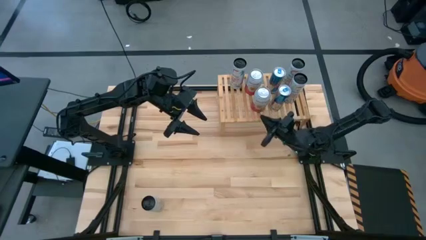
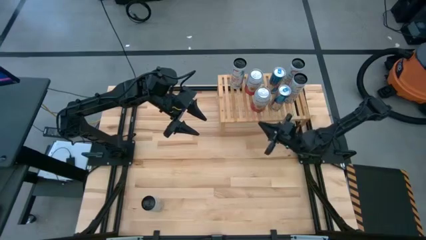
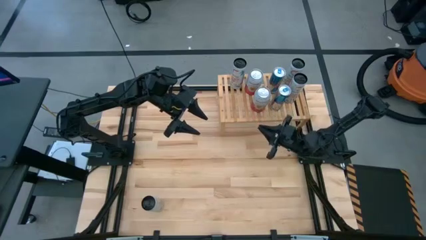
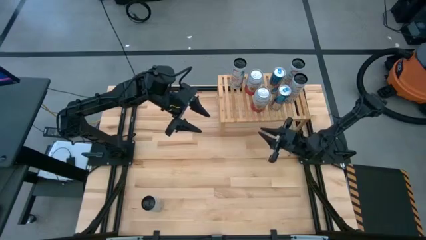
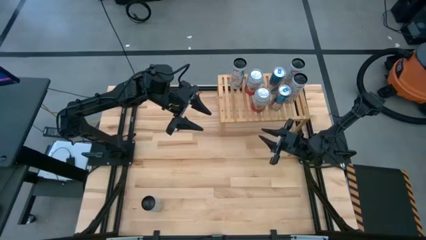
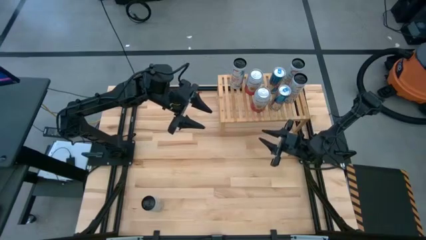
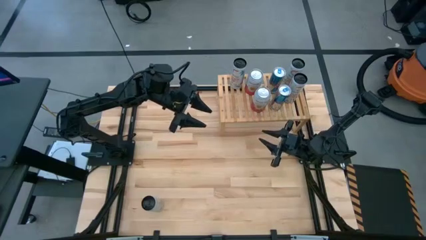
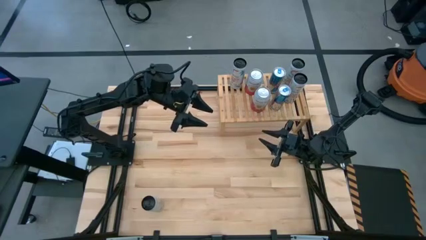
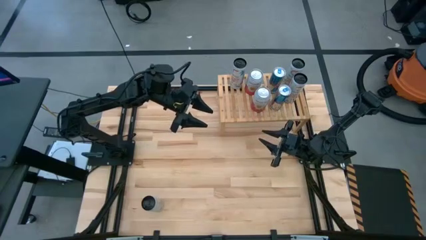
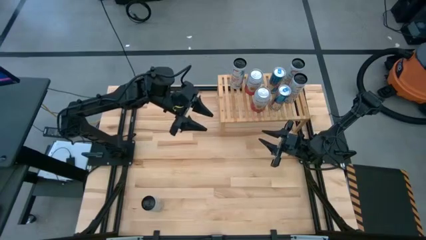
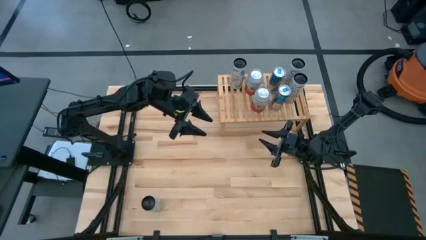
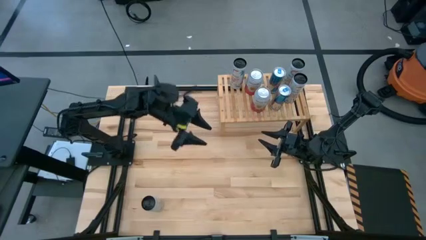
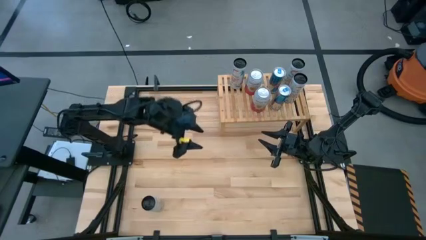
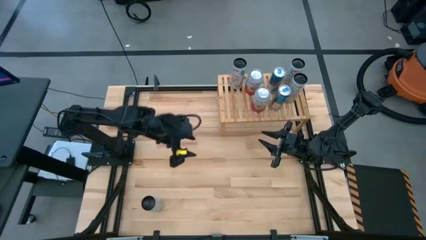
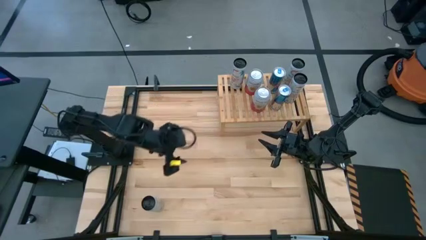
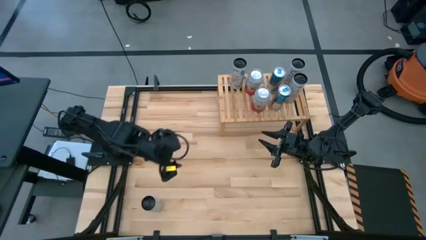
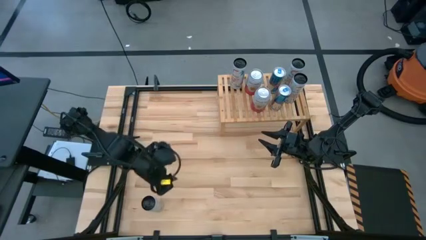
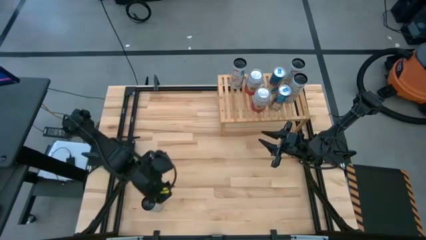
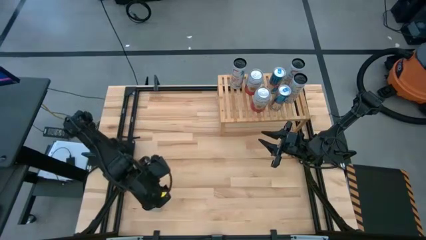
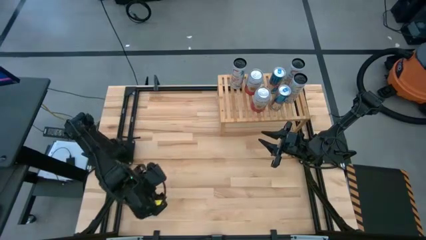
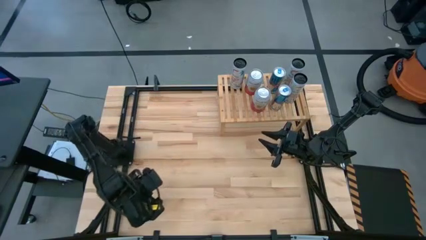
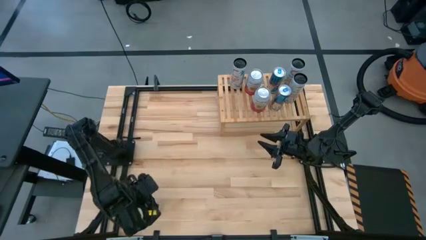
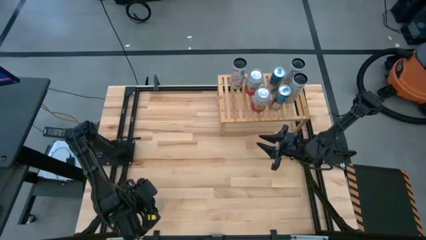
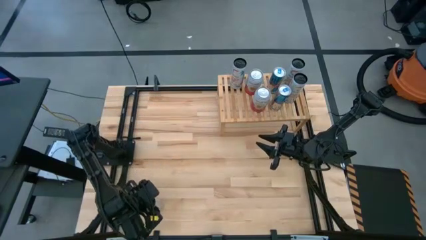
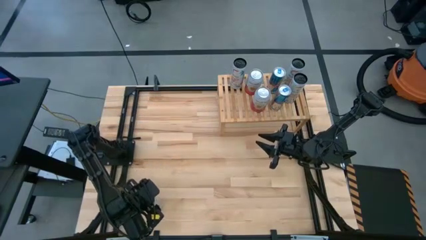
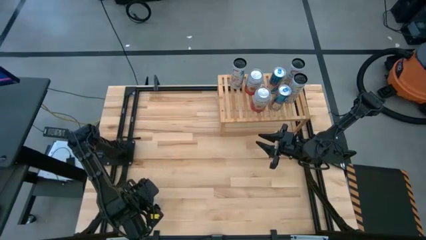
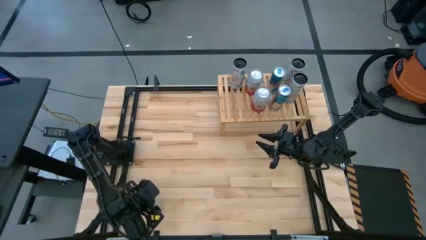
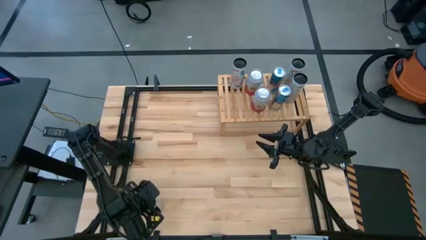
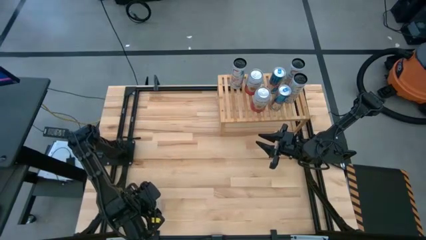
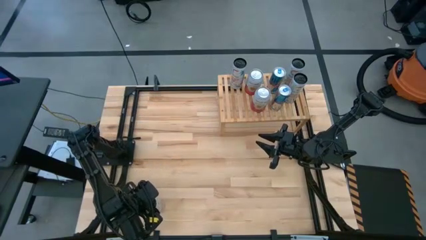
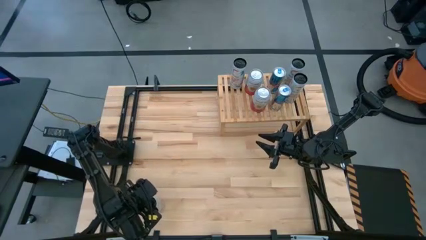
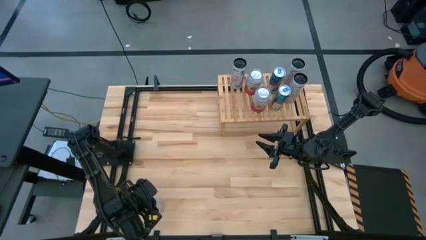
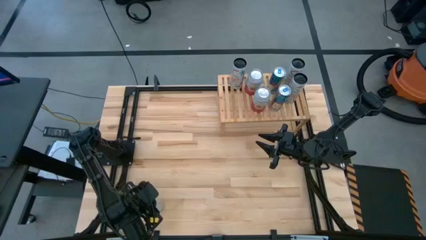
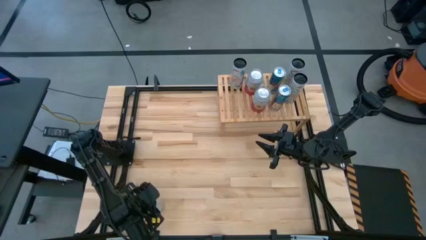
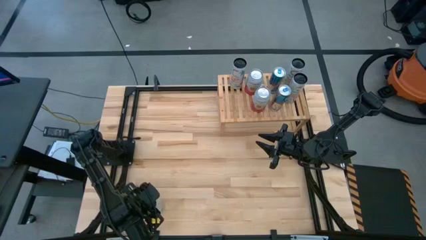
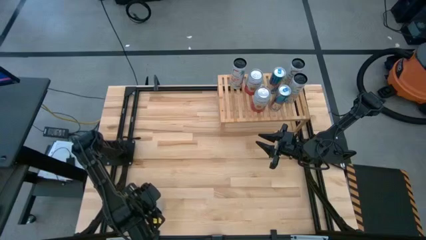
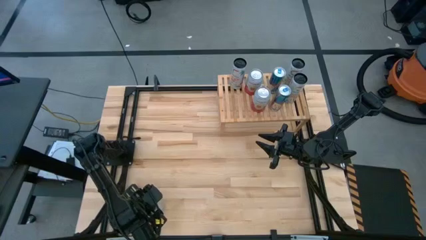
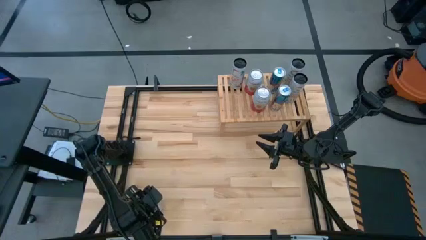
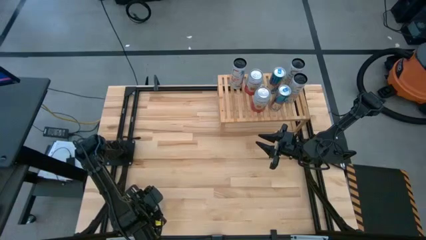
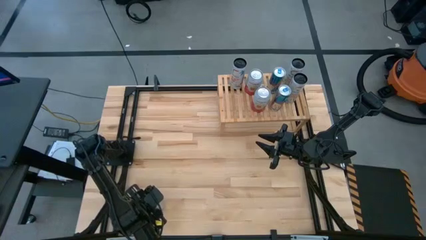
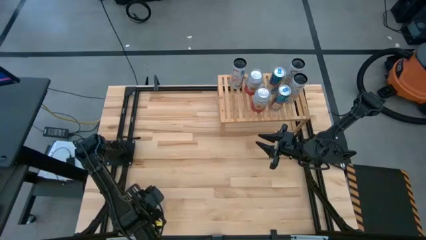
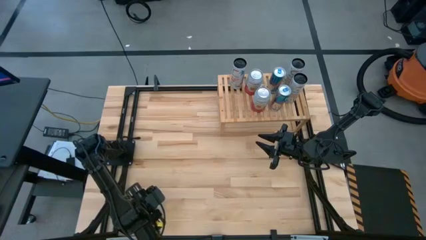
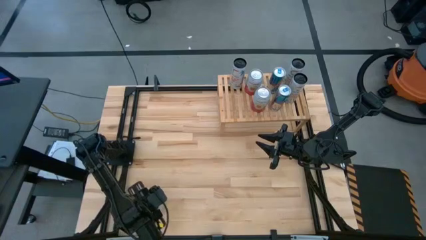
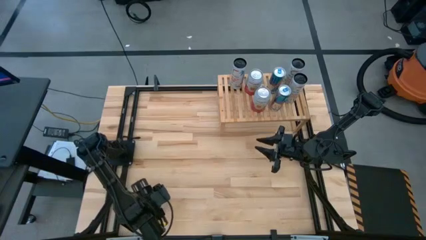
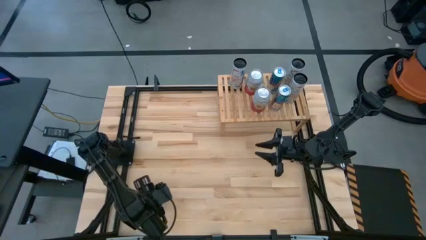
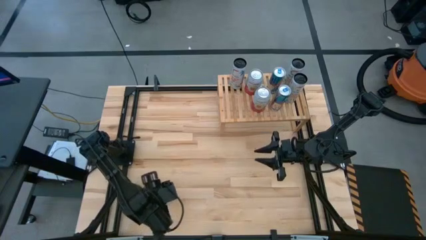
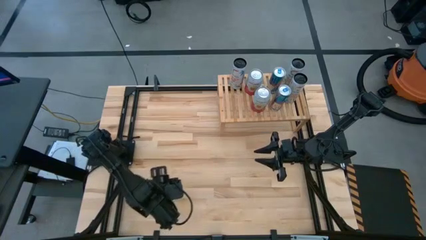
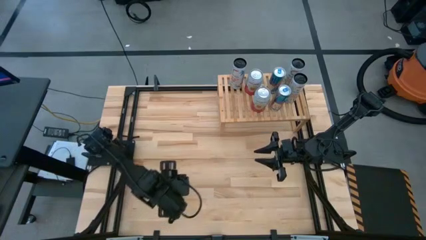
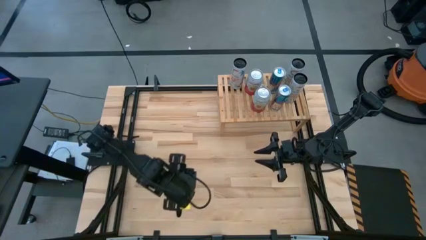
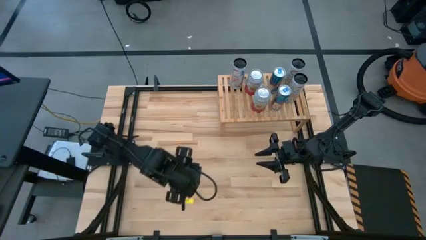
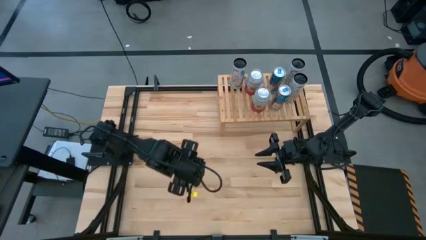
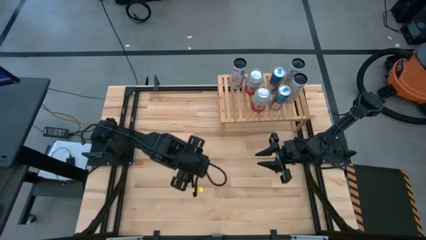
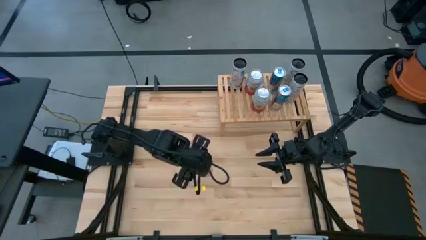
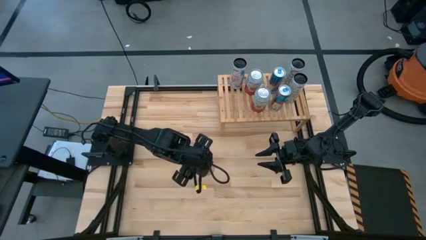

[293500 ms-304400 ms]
Task: Place canned beverage on shelf
Put the white-pink soda can on the shelf aligned with the other white-pink soda can
